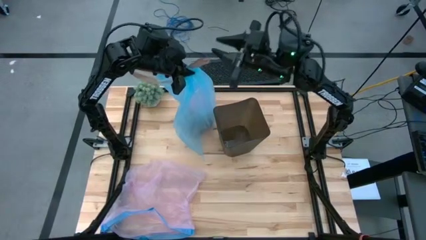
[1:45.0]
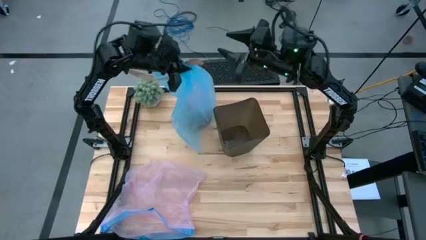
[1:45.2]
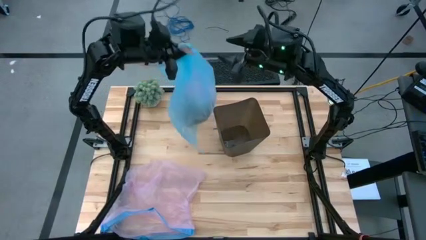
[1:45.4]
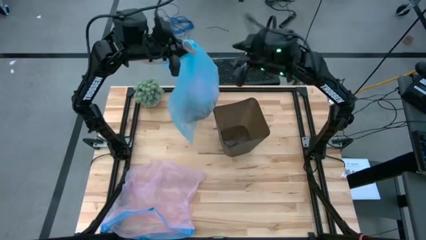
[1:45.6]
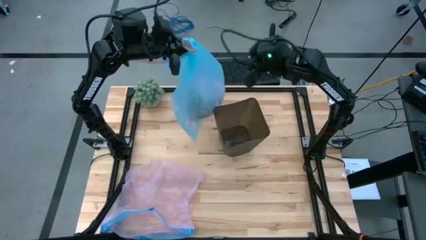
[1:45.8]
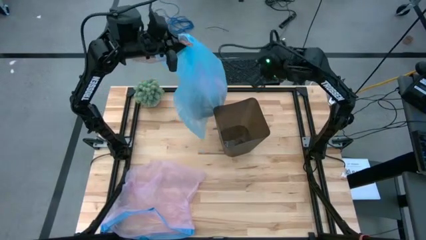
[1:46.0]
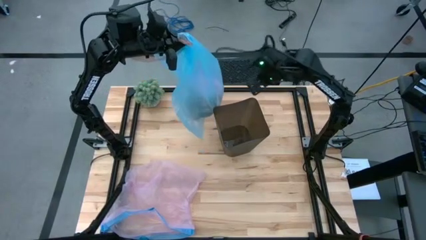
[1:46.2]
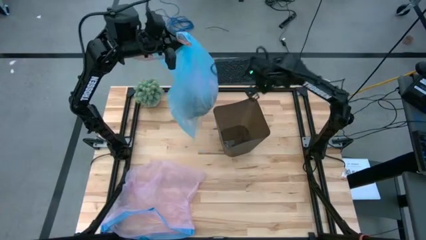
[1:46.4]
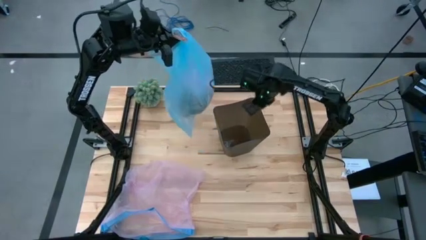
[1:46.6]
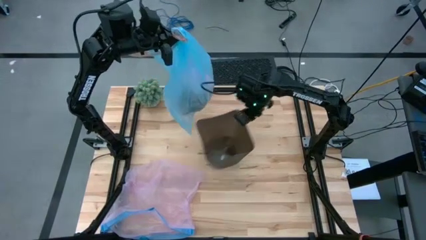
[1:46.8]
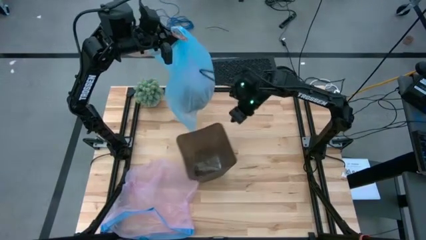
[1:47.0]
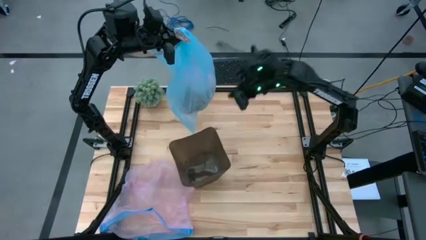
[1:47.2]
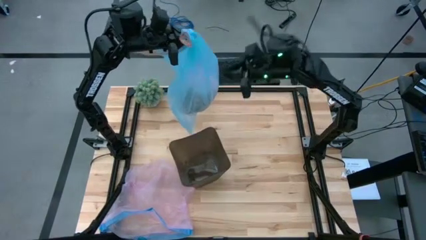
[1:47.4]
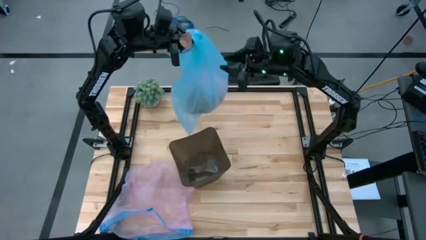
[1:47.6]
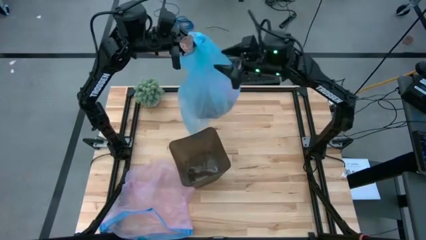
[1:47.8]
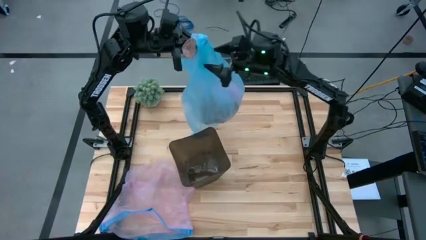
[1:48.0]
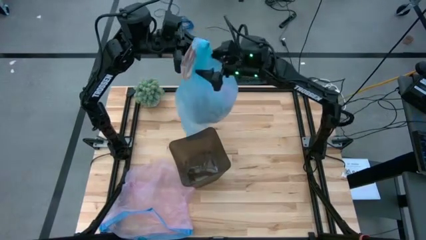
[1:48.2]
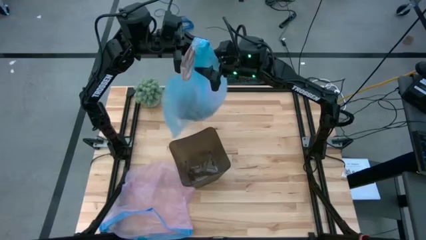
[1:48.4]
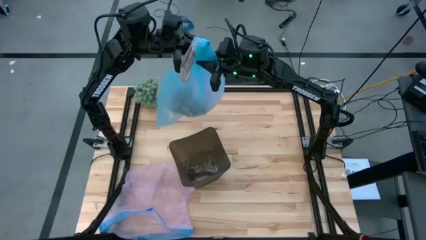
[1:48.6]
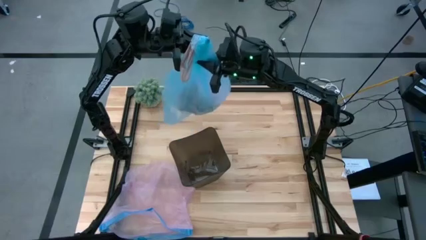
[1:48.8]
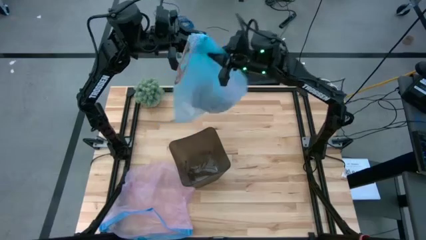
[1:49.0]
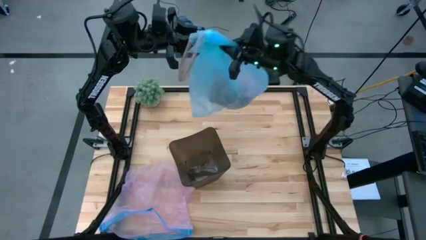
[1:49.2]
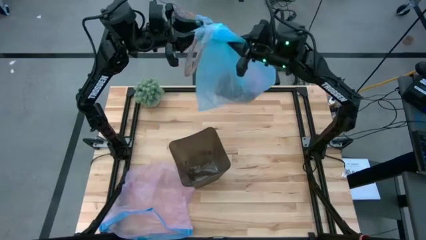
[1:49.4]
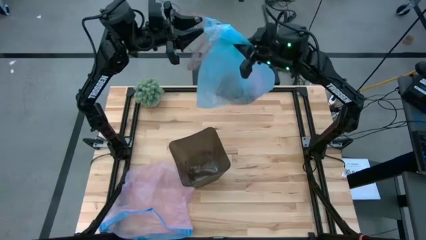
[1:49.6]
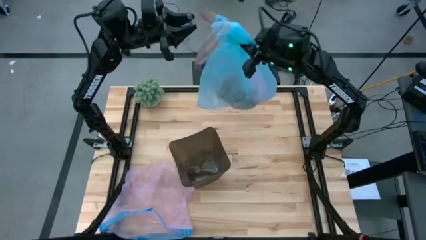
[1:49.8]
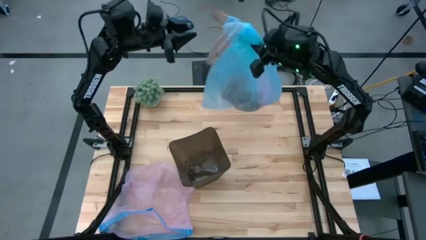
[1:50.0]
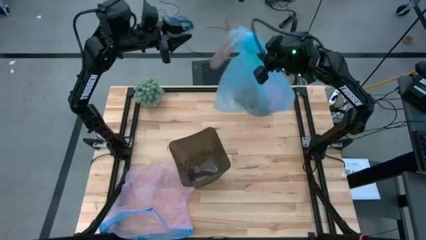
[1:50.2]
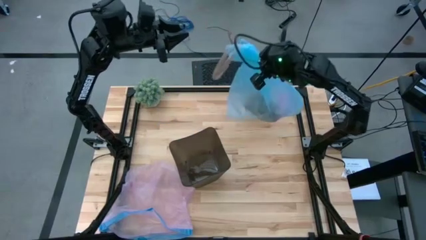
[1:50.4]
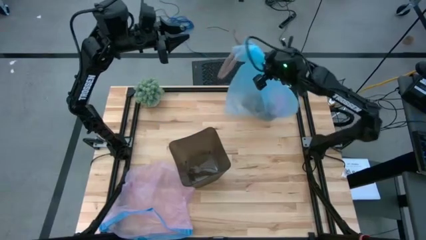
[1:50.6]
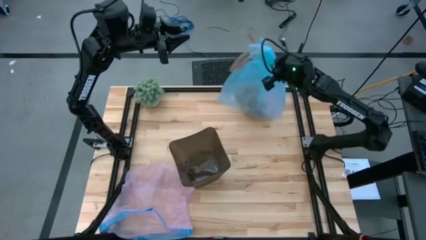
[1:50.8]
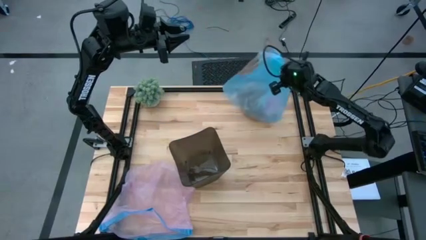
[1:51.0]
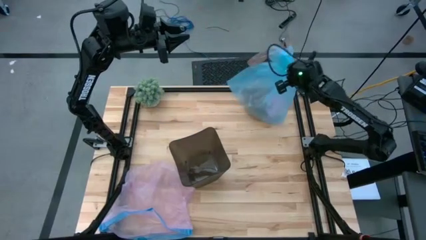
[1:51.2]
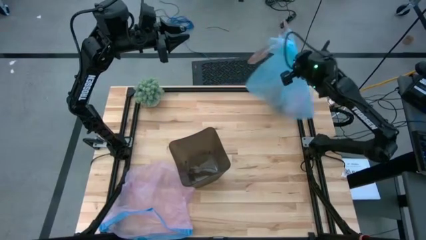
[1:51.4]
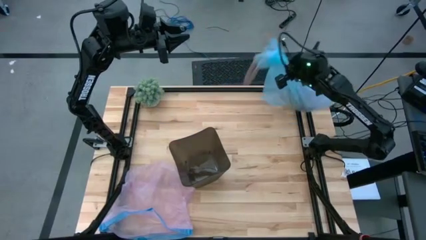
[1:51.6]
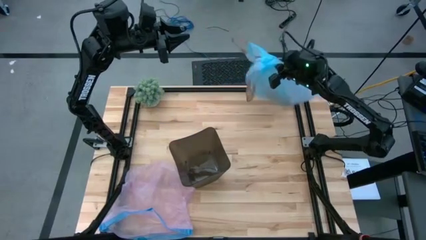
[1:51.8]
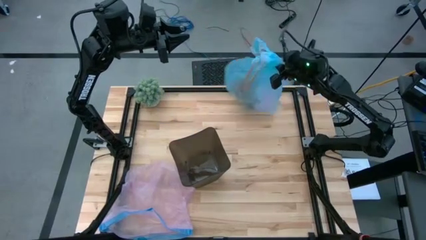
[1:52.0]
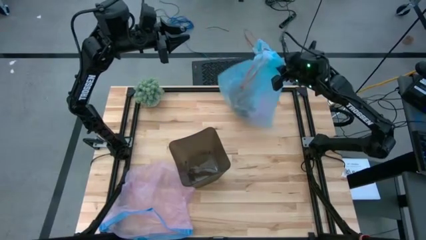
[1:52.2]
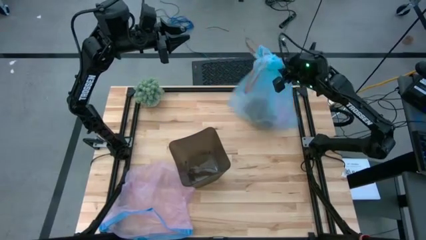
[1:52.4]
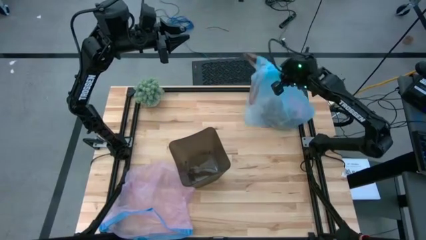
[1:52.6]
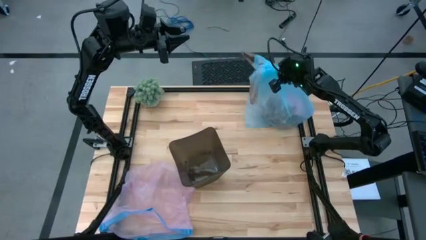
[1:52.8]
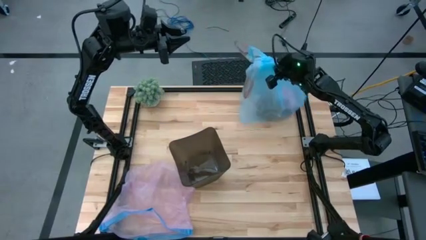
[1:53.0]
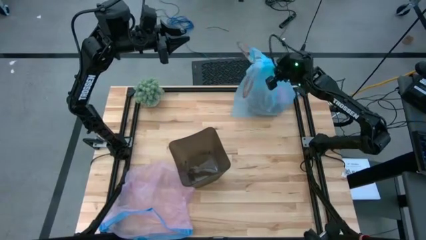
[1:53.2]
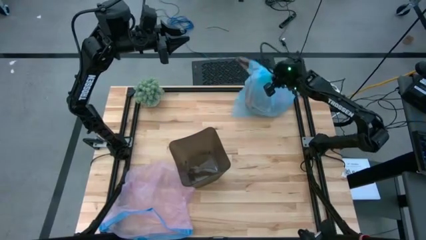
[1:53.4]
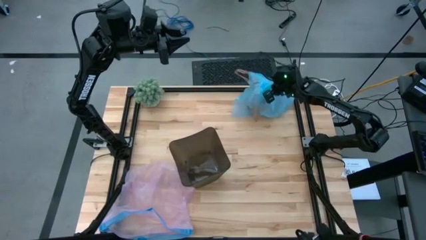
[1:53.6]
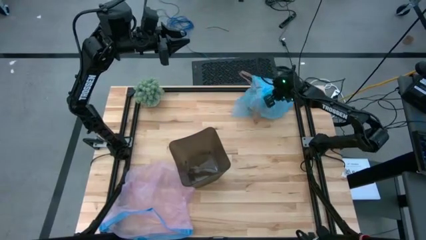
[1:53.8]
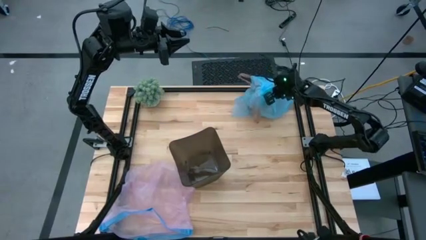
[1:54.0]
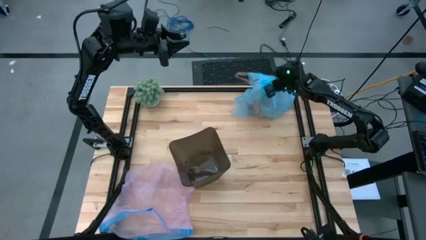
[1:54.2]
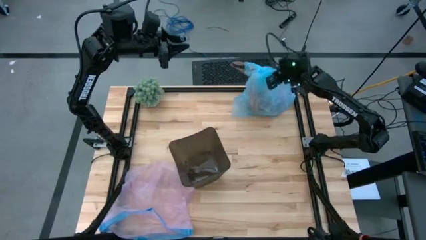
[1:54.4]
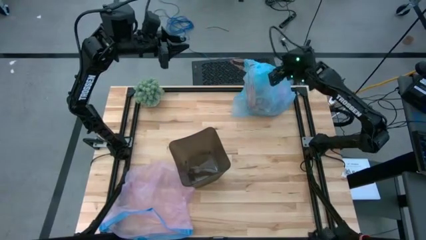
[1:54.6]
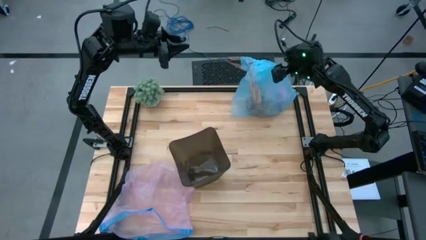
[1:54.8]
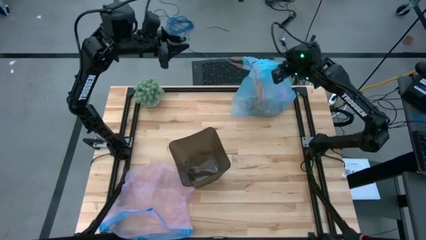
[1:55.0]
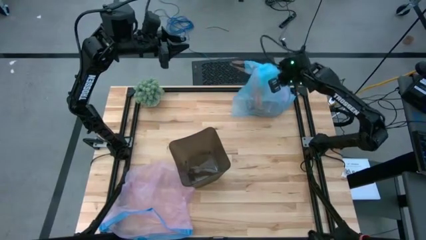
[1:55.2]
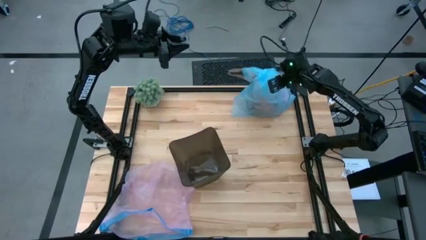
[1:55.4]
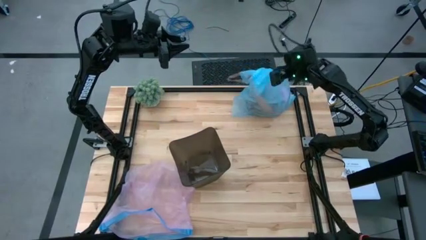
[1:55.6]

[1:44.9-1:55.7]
Task: place trash/remove bag and relplace
Put the blue trash bag on the top right of the table

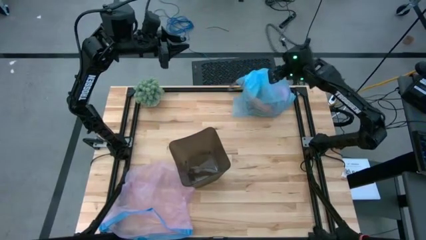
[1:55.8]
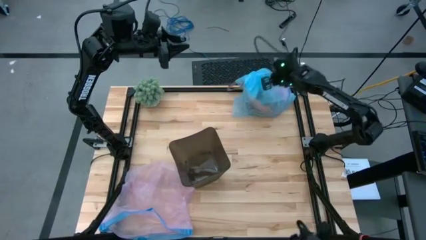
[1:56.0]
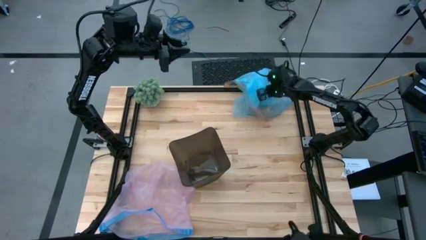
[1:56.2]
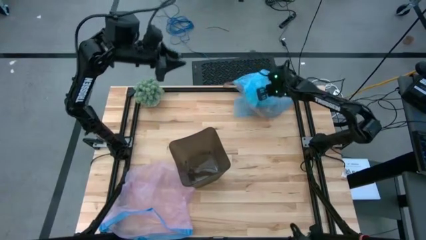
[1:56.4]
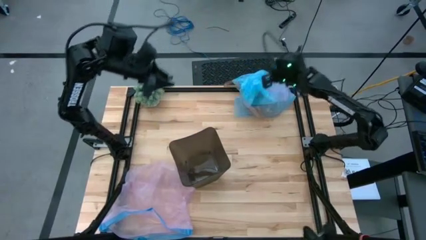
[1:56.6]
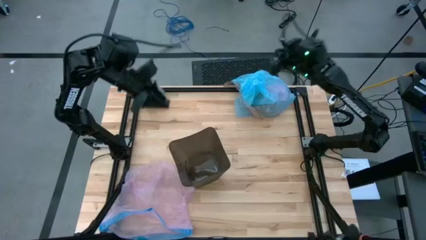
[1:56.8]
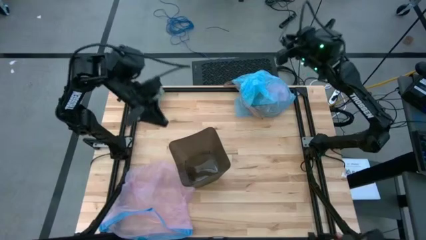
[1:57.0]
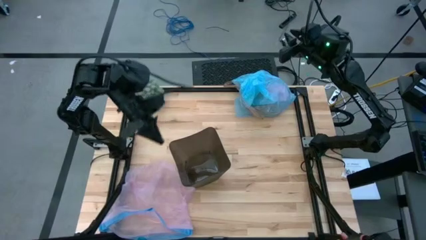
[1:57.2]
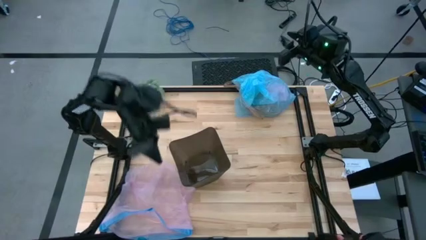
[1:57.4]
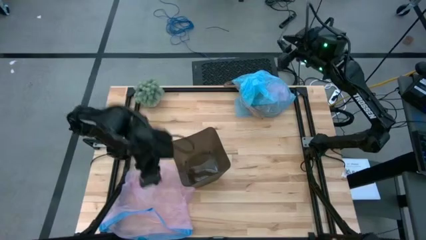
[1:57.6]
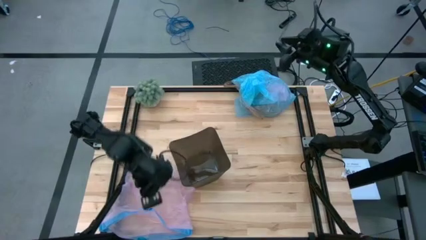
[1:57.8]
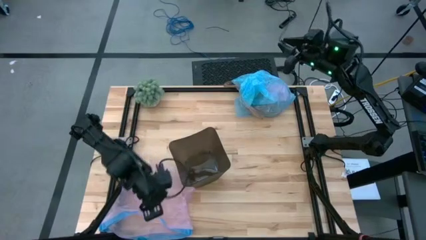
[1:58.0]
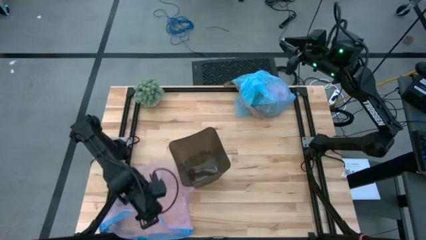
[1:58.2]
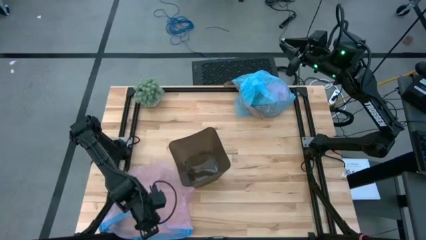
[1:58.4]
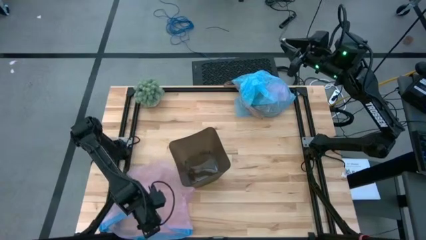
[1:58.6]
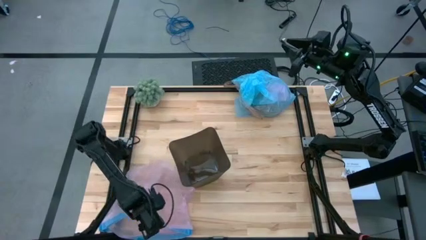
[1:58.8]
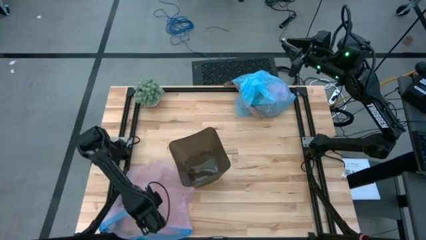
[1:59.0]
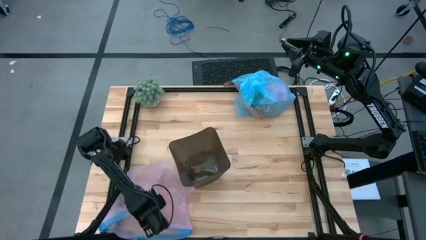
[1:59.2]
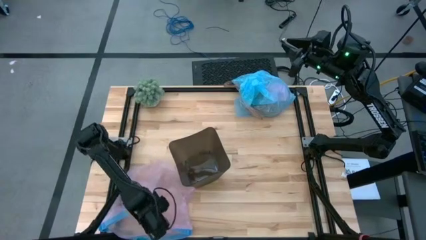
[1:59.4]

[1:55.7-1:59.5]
Insert the pink trash bag into the trash bin
